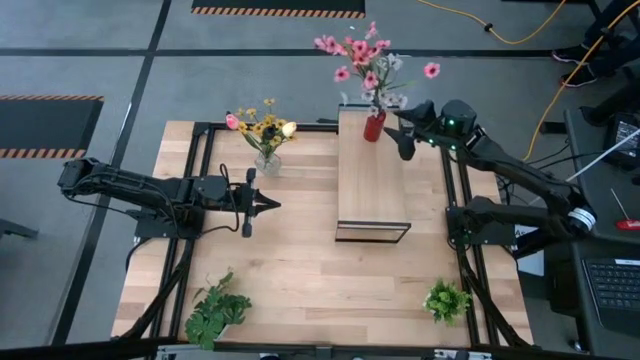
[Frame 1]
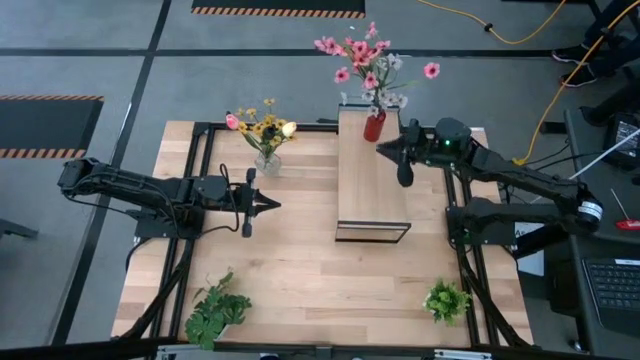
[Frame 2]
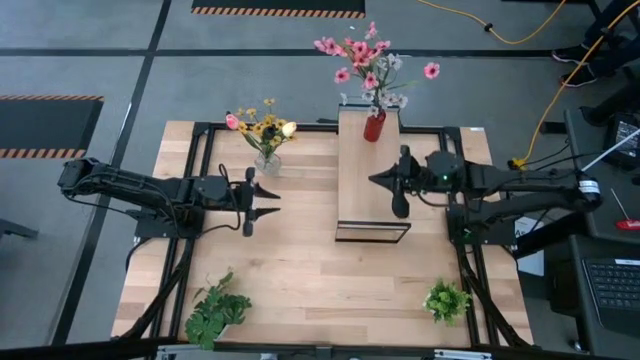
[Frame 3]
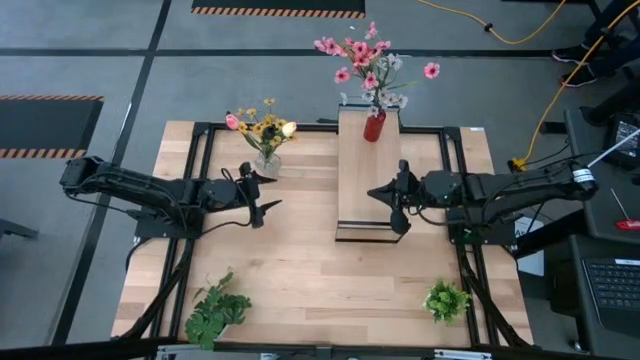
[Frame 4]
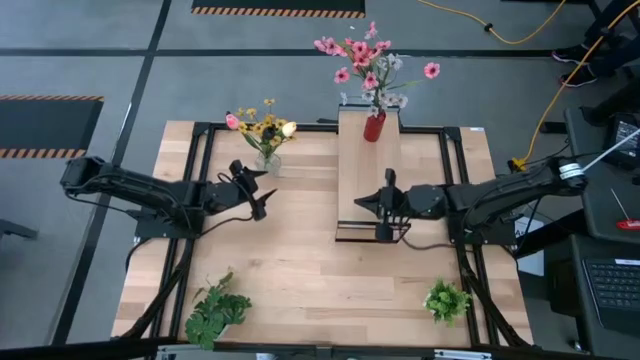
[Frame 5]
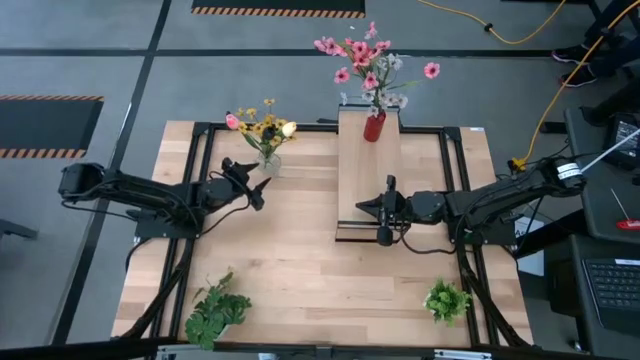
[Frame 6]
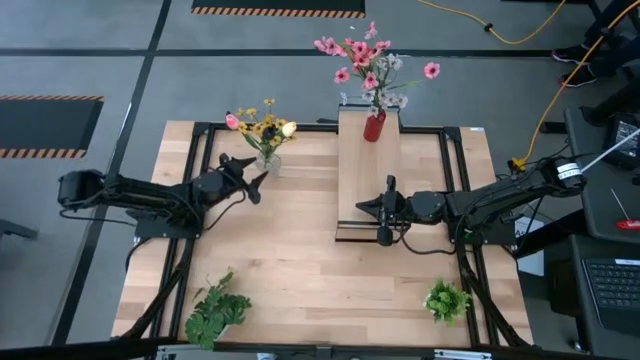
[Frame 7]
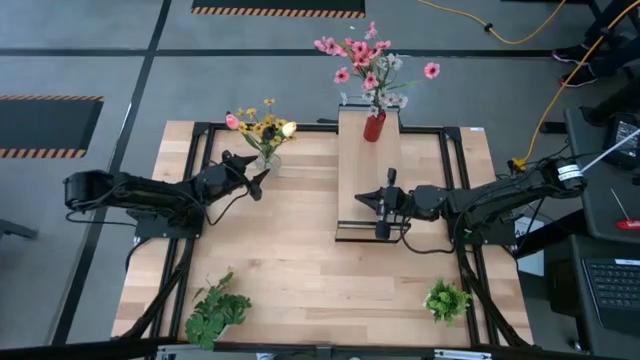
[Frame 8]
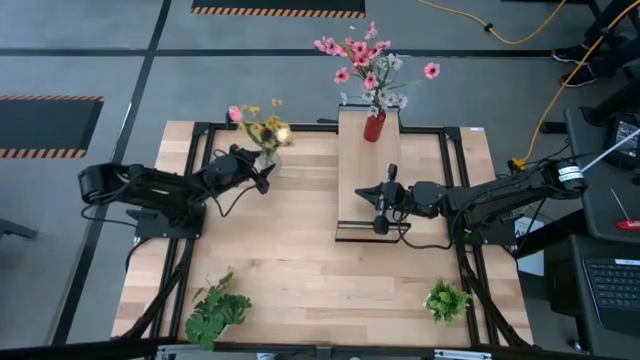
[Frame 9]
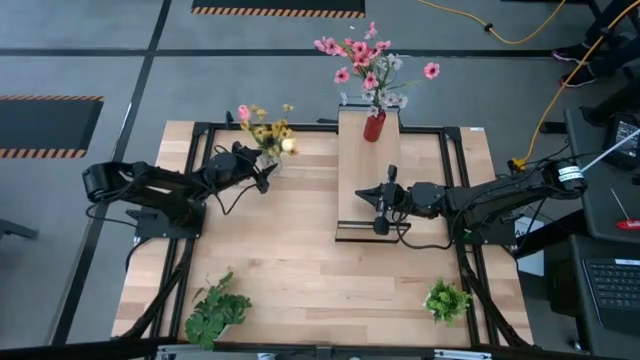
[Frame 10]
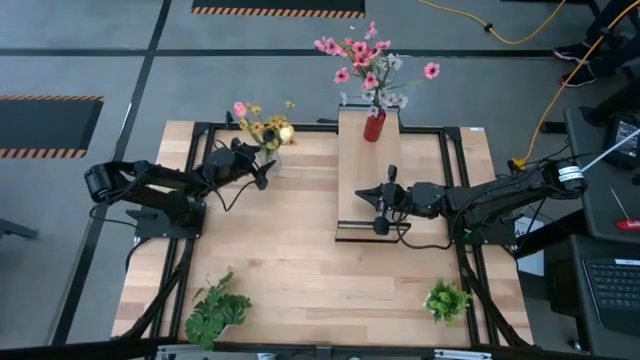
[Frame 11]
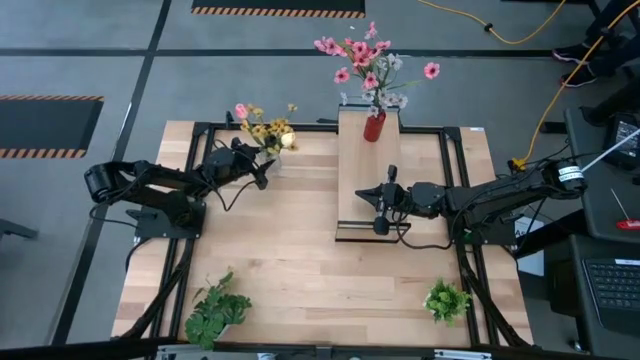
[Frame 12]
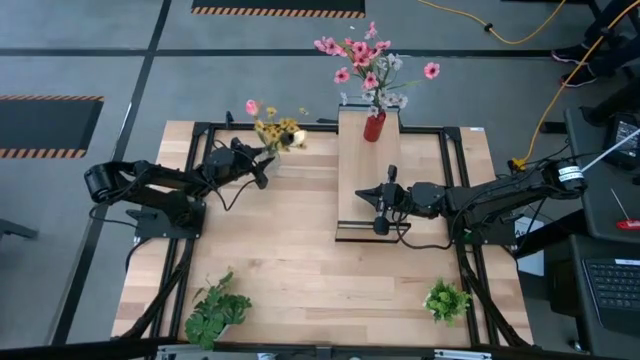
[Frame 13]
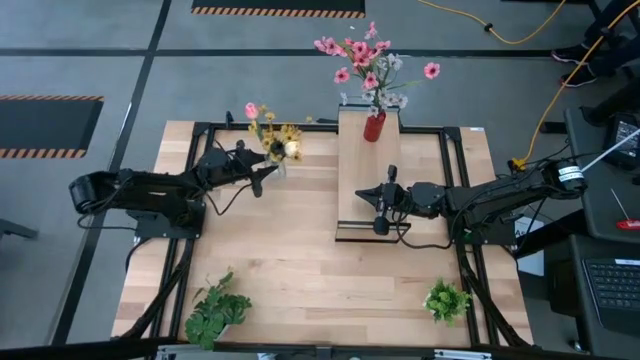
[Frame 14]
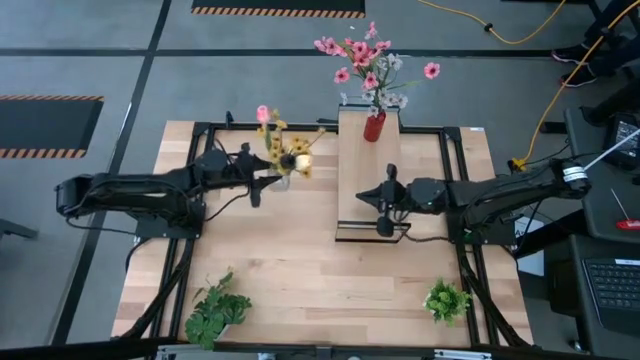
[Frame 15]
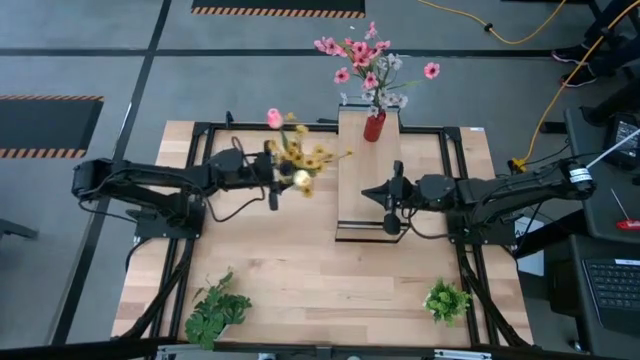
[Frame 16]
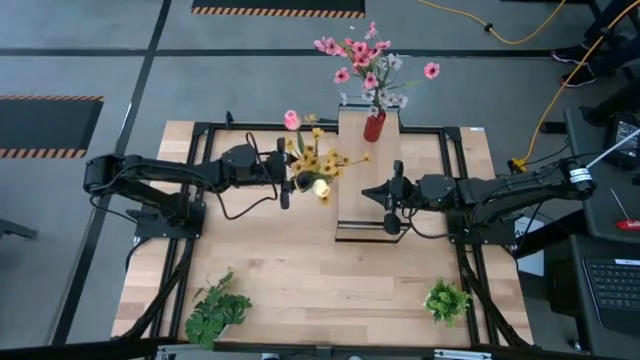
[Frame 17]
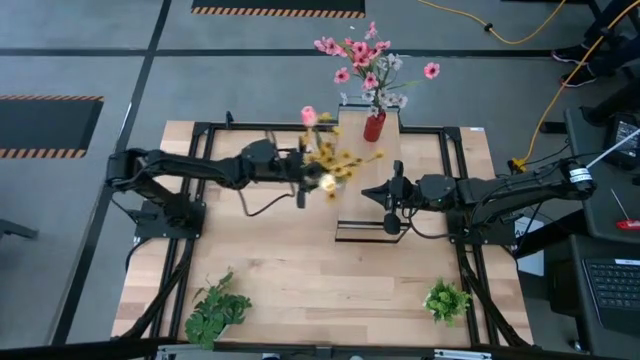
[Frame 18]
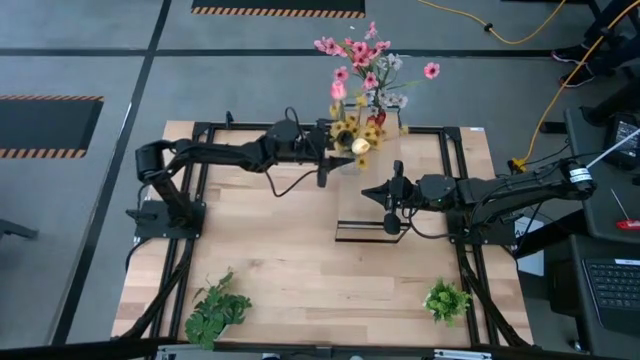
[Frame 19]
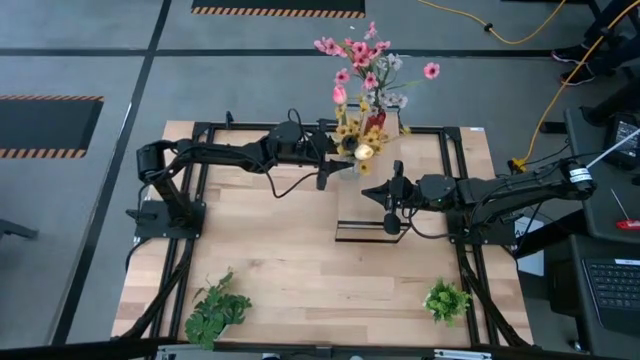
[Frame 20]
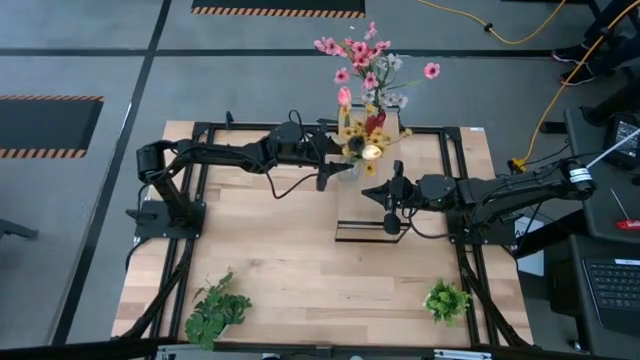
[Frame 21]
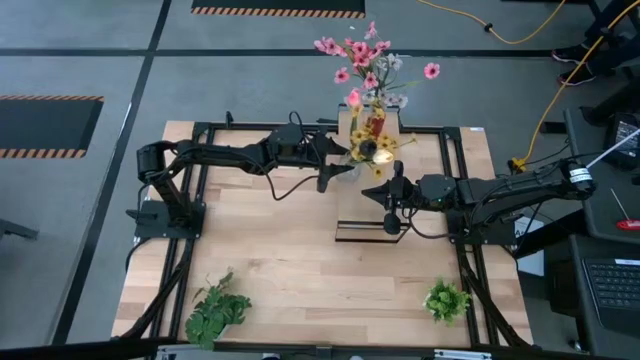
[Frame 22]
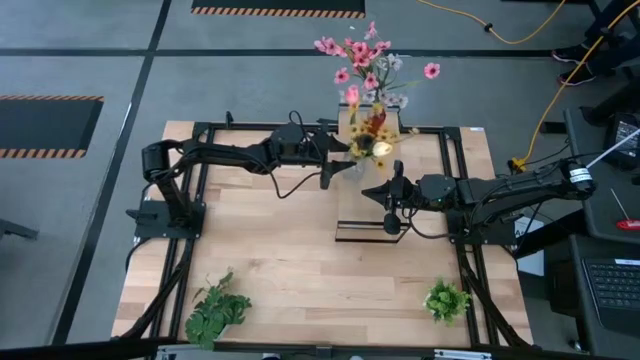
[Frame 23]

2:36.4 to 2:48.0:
Task: Pick and place flowers into a vace then onto a shelf
Put the transparent vase on the shelf

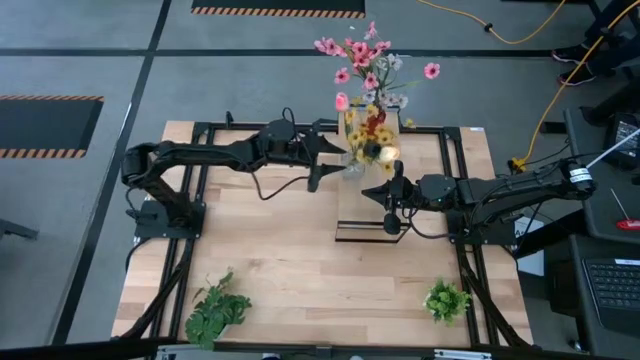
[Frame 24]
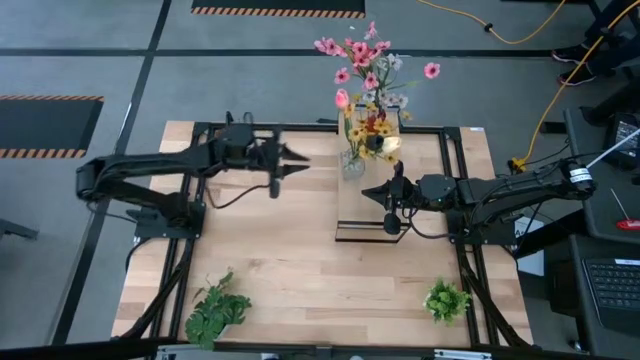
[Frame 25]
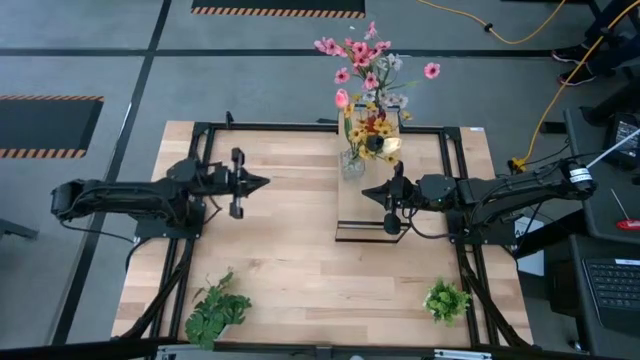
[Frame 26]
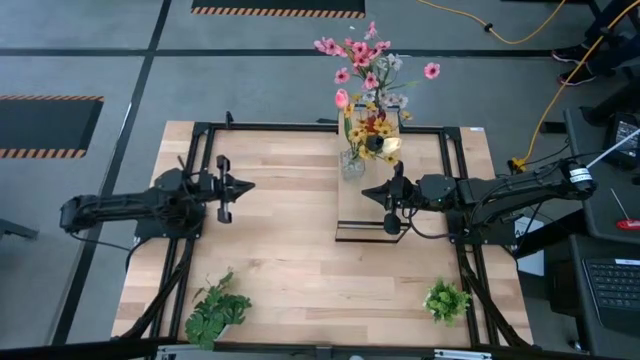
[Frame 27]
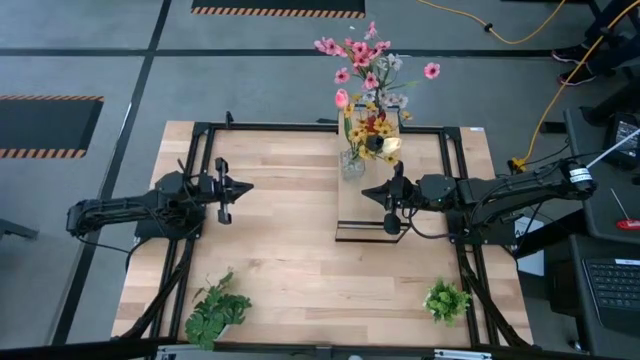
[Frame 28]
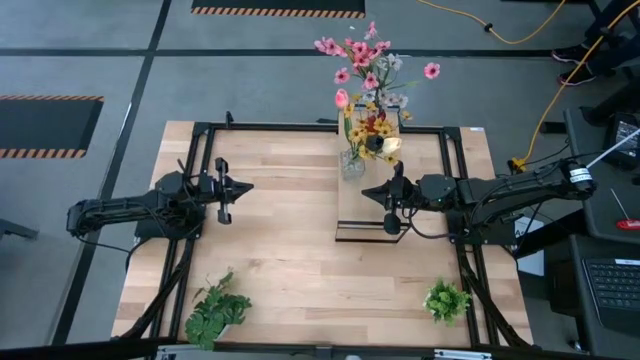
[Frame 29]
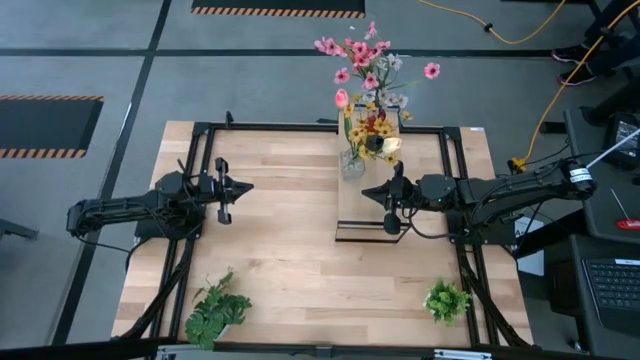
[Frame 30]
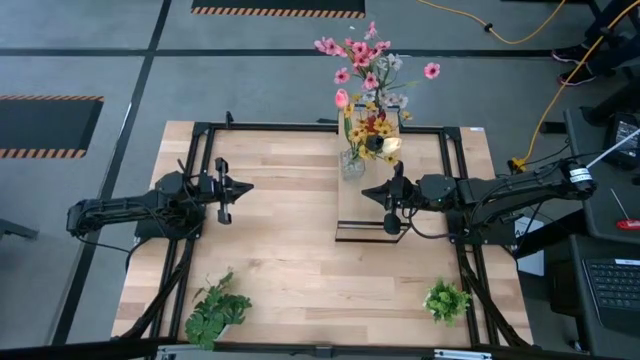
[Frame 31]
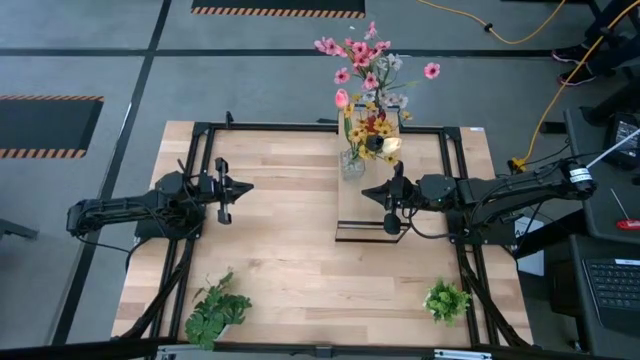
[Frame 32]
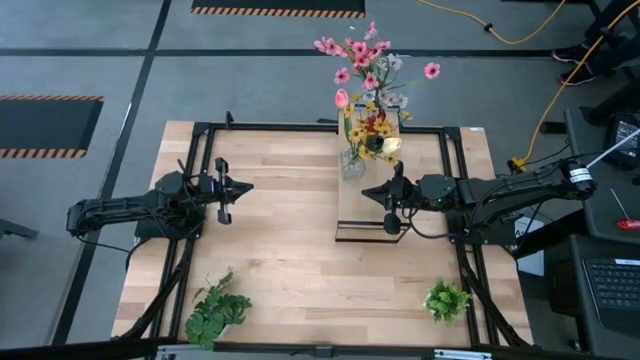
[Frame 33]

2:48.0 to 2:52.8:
Return to Home Position
